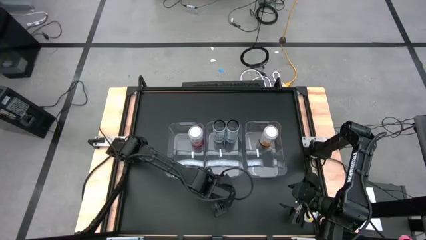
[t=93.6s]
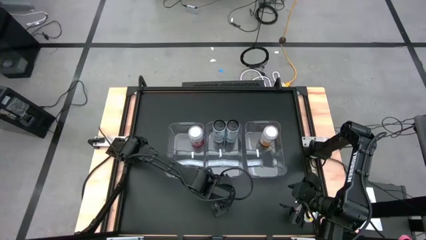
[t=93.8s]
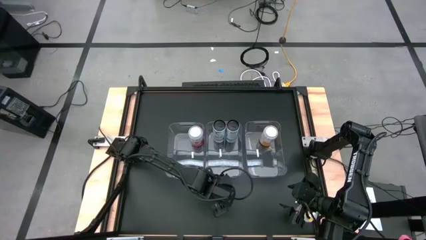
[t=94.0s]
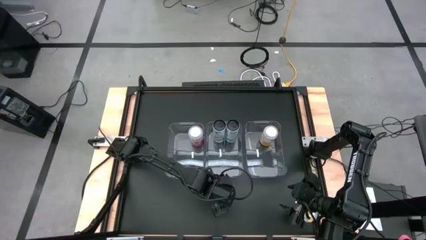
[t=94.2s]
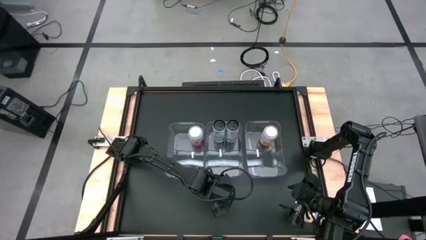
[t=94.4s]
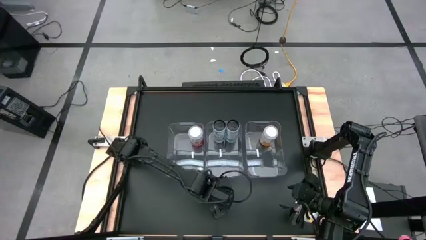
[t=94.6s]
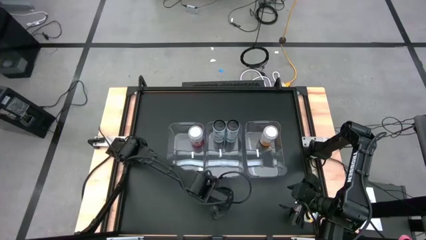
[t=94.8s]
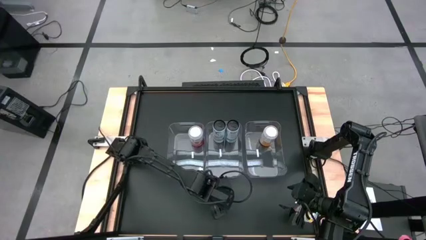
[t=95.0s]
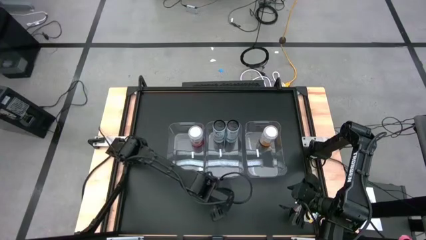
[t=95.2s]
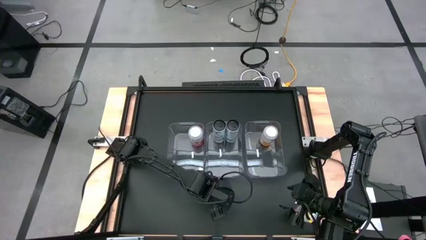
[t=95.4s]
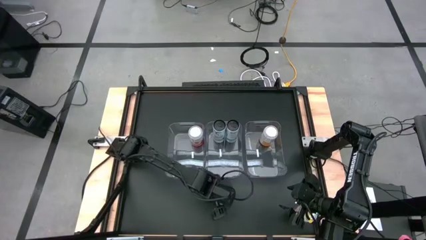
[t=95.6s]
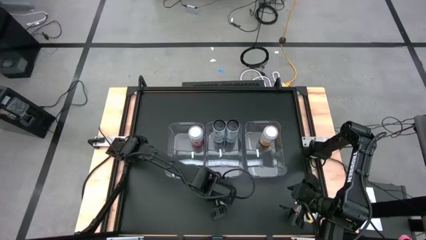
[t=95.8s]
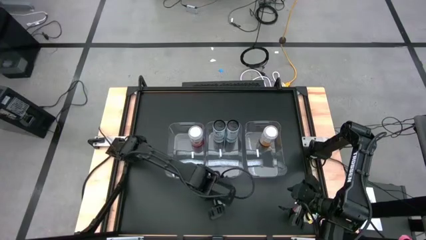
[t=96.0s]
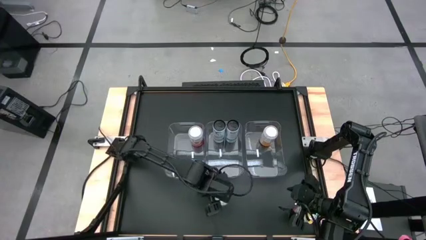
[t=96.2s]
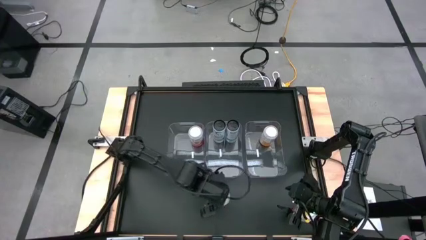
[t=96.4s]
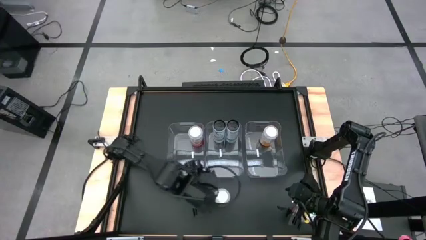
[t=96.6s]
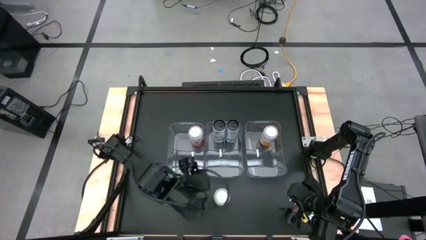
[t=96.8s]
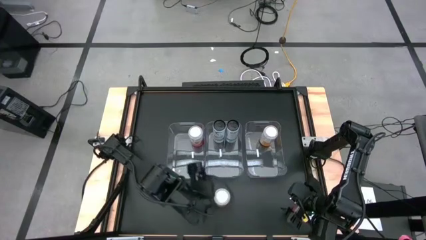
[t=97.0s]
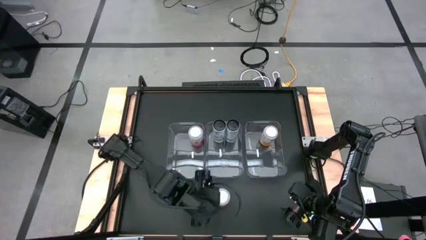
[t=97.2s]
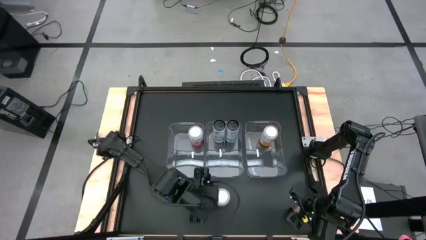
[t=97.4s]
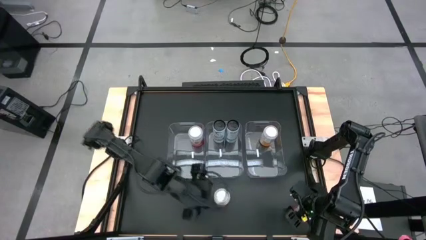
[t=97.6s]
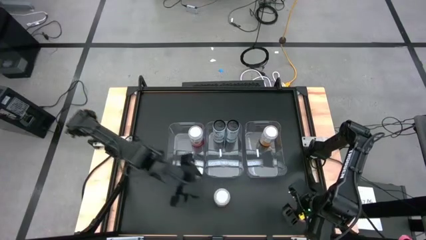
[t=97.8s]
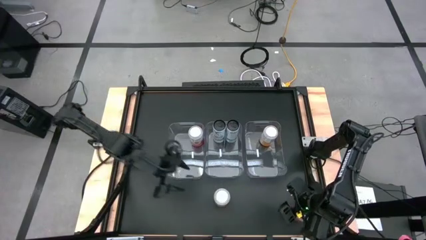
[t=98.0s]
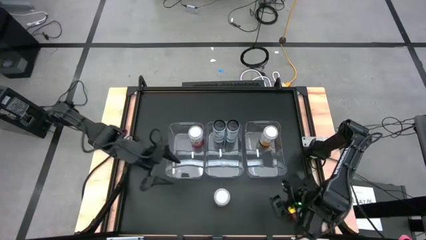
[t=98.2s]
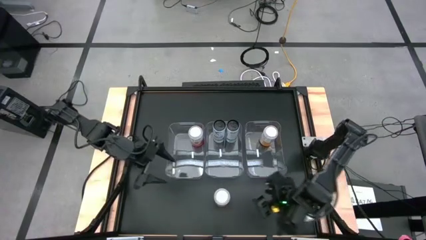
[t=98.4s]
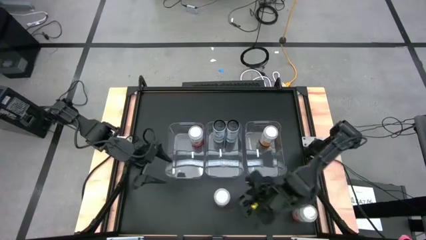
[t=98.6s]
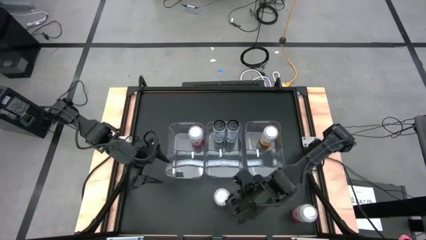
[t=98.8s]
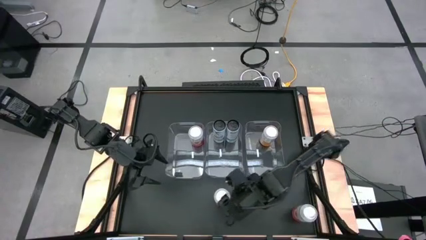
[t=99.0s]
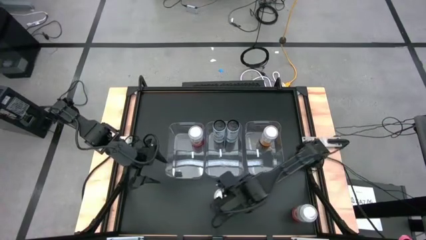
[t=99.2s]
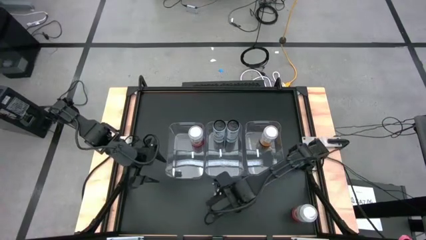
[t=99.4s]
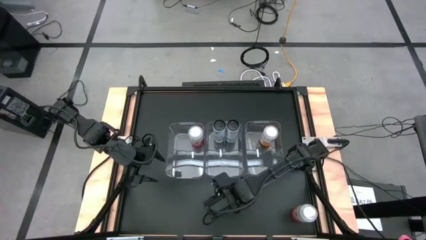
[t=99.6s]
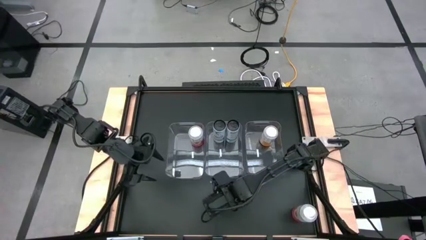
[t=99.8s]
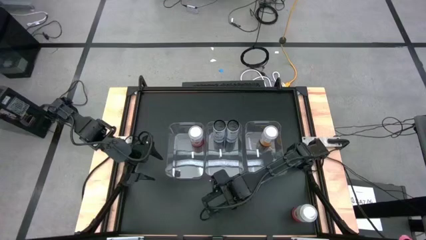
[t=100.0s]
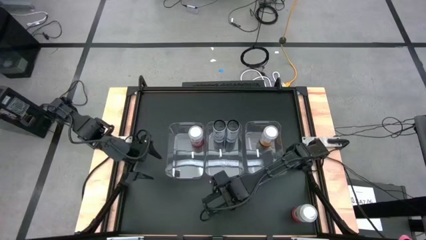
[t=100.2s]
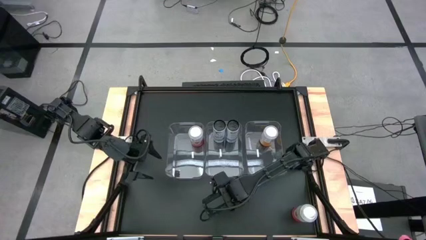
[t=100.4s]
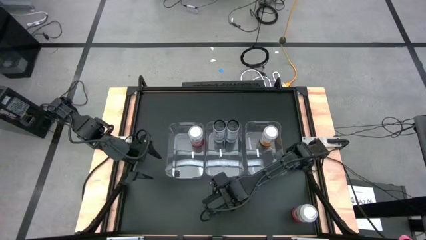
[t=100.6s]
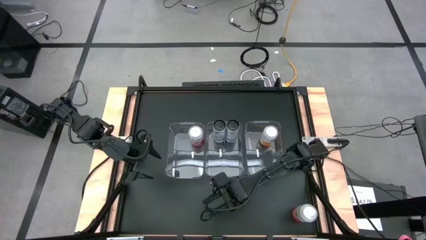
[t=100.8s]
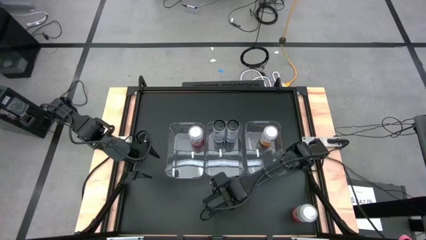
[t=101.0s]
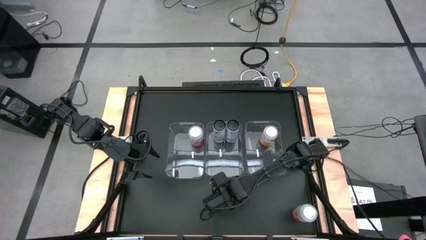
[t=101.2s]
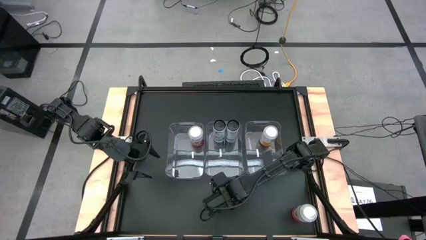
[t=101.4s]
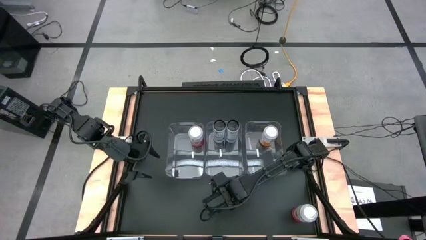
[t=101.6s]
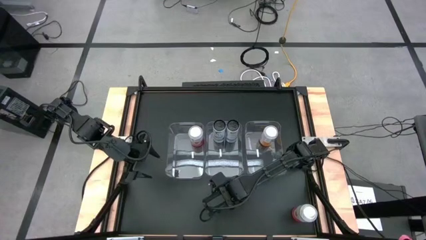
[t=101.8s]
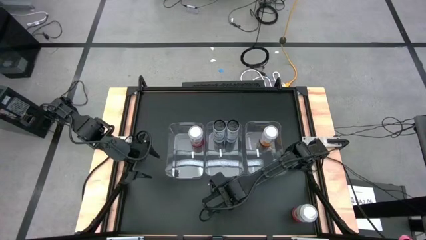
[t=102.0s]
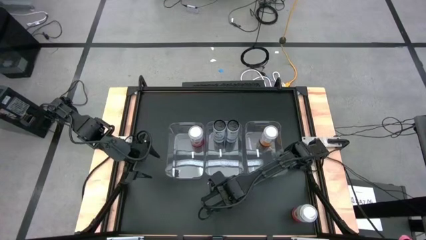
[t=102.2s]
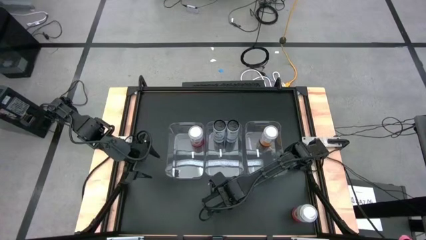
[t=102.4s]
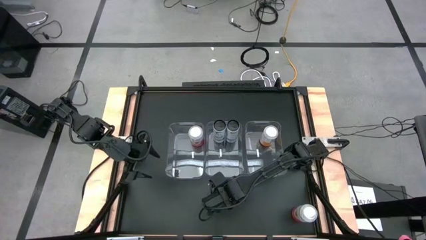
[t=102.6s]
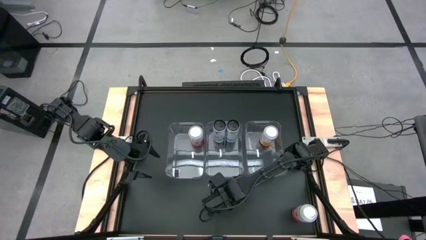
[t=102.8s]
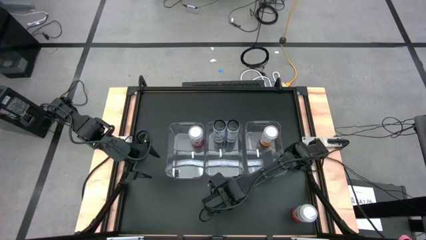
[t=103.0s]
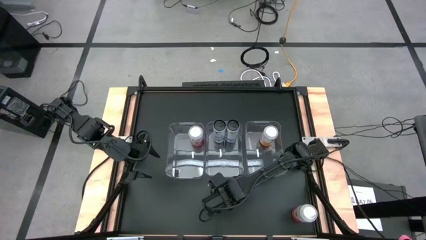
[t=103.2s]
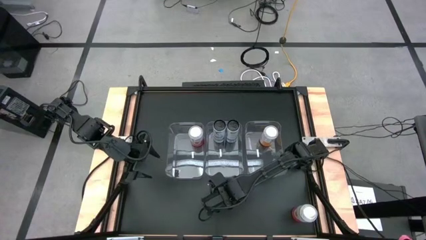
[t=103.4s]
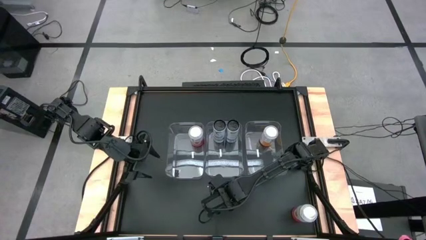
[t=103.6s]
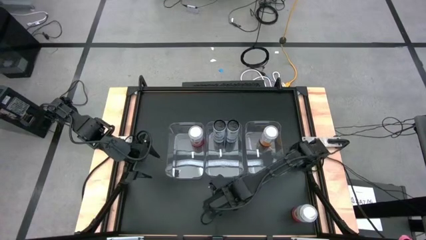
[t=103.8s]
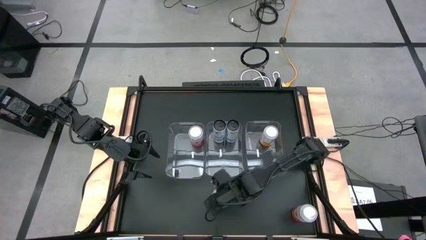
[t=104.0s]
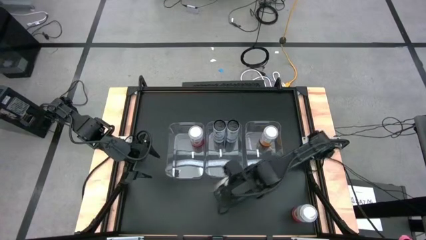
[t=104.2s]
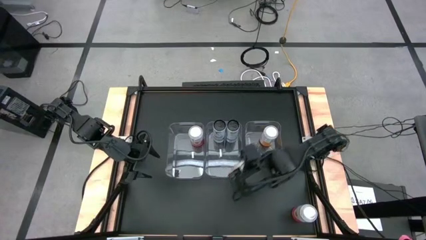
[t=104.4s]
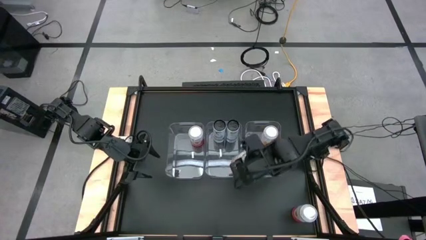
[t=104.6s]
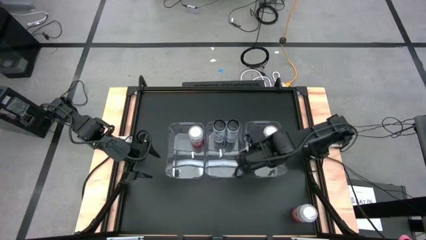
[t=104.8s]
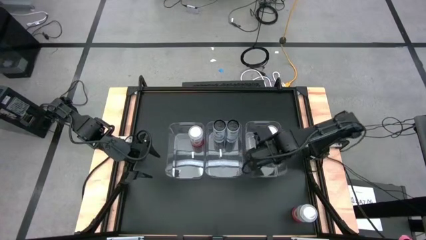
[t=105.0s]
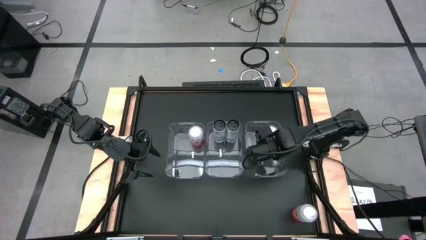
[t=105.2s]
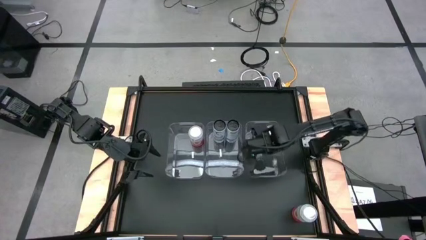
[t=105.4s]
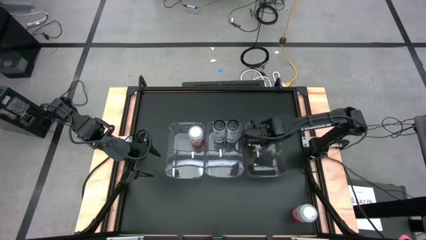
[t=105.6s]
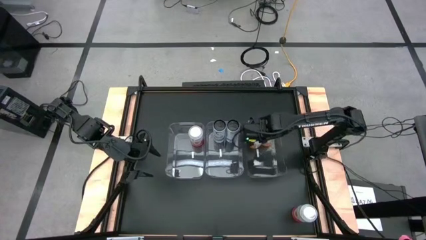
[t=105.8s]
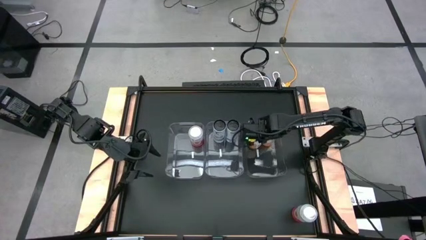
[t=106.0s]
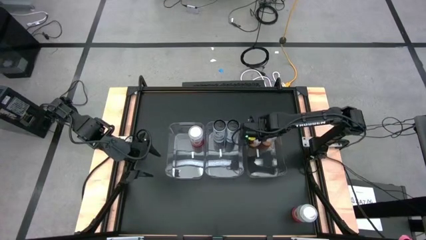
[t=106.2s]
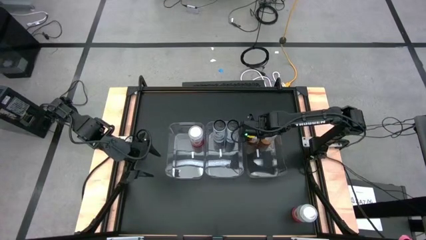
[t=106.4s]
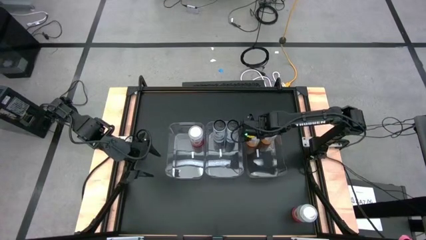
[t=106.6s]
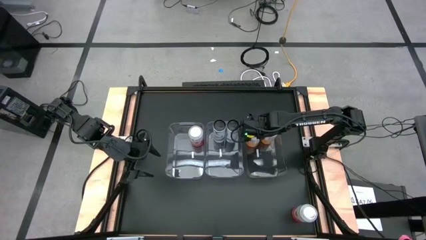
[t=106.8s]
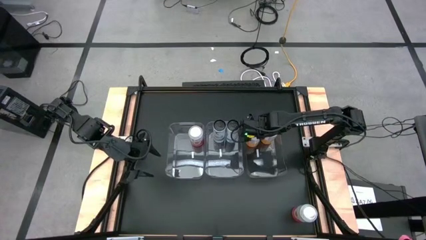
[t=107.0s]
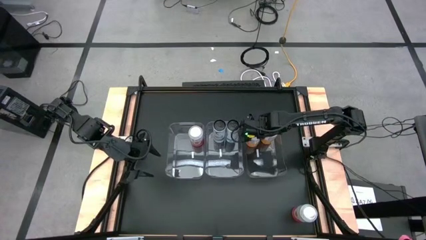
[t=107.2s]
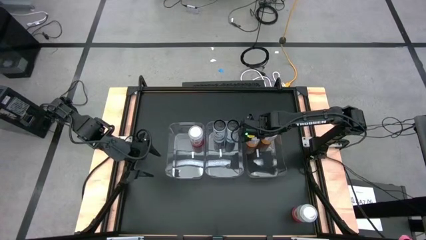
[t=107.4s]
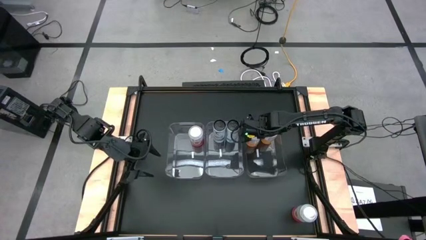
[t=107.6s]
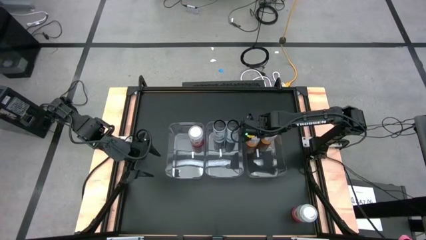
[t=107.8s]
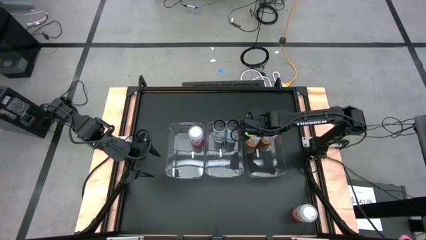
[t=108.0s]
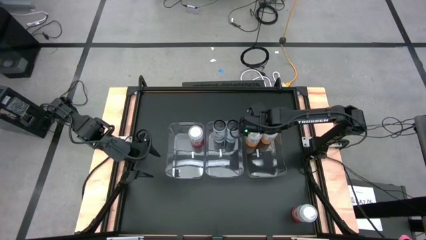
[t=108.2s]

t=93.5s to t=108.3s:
Task: Sort soda cans
Put the yellow-white soda can into the right transparent bin

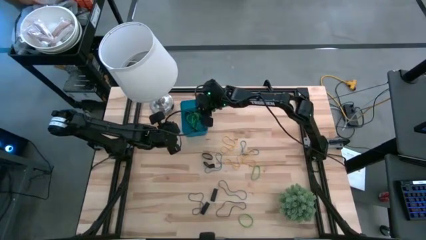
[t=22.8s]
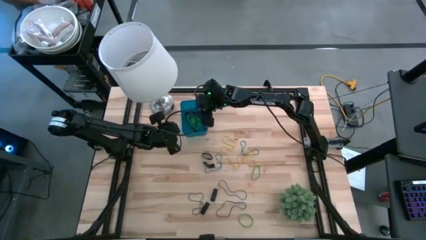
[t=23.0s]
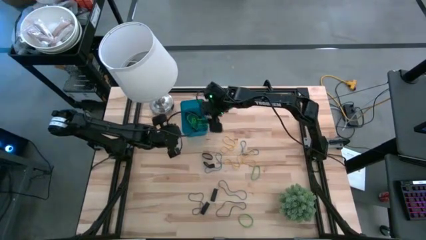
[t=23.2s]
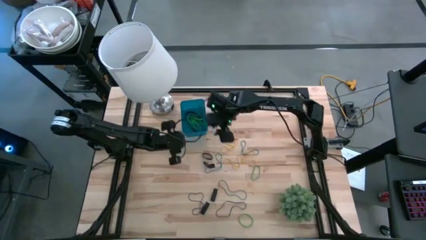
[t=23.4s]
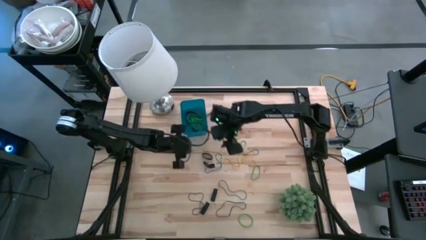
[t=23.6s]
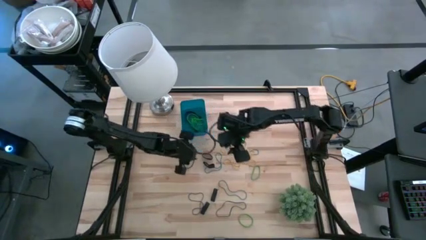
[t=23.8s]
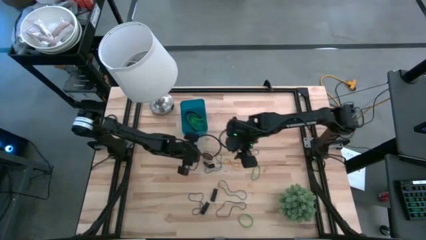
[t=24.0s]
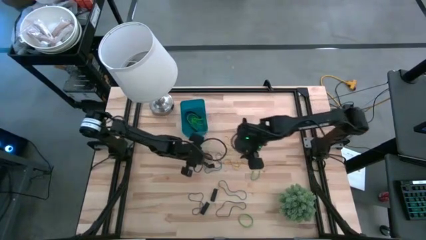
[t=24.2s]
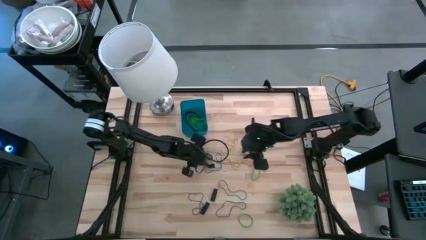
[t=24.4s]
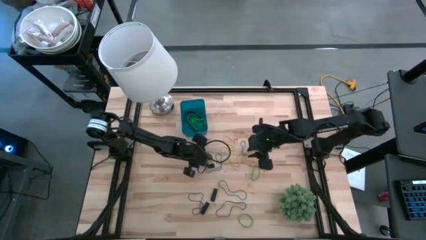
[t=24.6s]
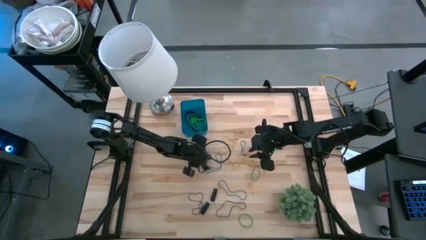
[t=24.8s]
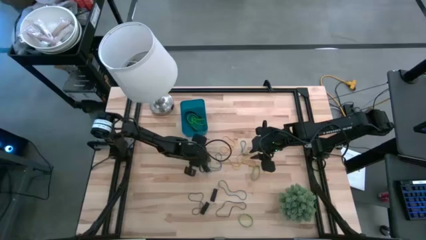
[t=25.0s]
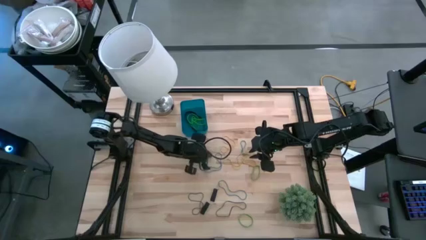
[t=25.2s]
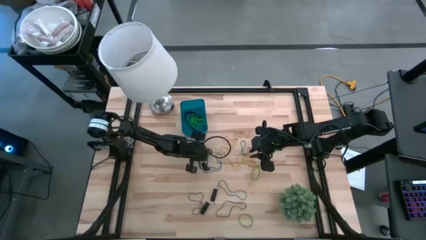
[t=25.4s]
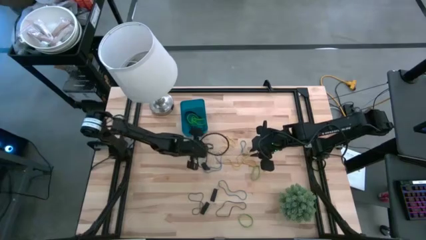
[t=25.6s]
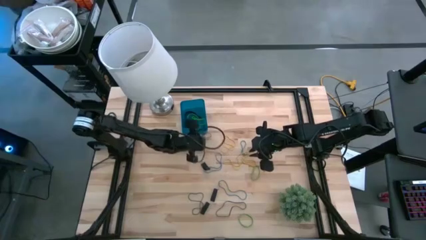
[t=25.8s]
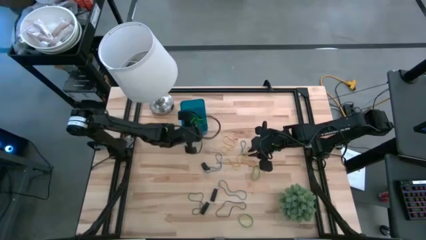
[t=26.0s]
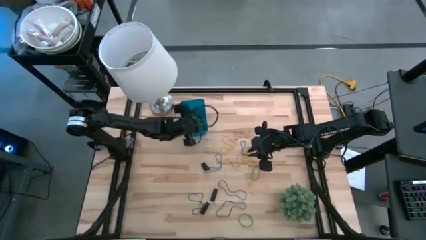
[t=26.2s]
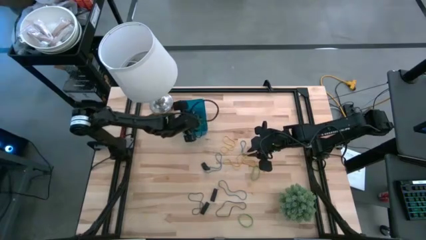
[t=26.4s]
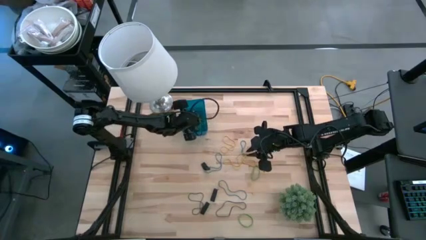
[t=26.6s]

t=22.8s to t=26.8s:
Task: Pick and place rubber bands into bin
Put the black rubber band into the blue bin
